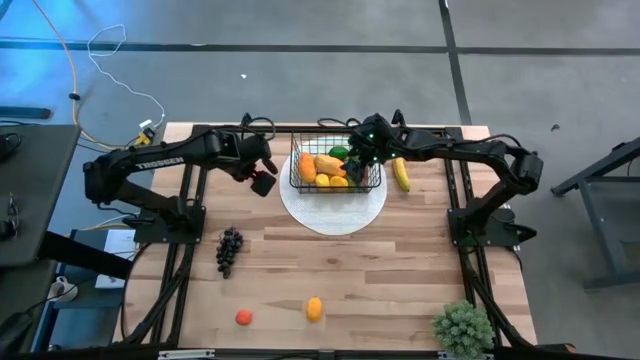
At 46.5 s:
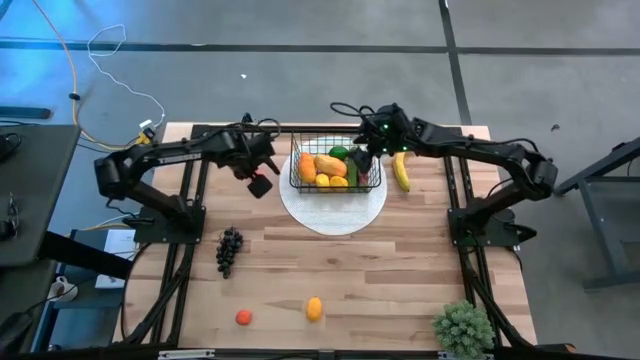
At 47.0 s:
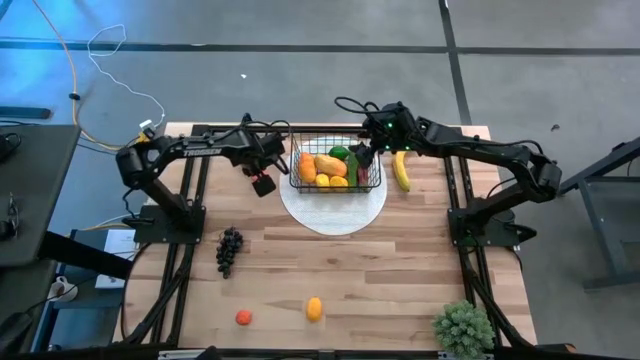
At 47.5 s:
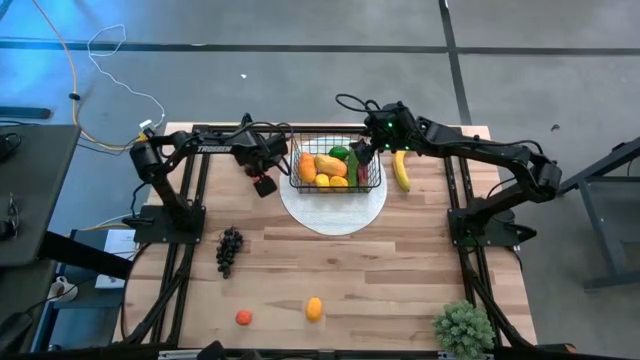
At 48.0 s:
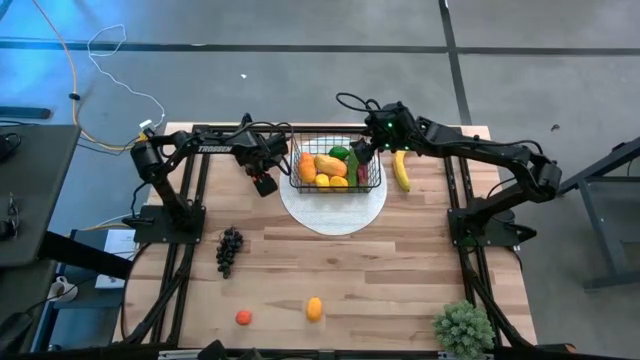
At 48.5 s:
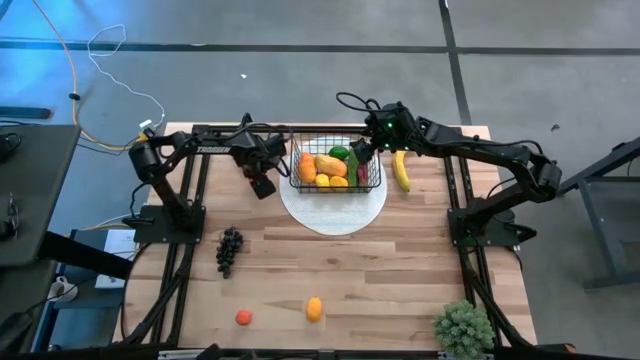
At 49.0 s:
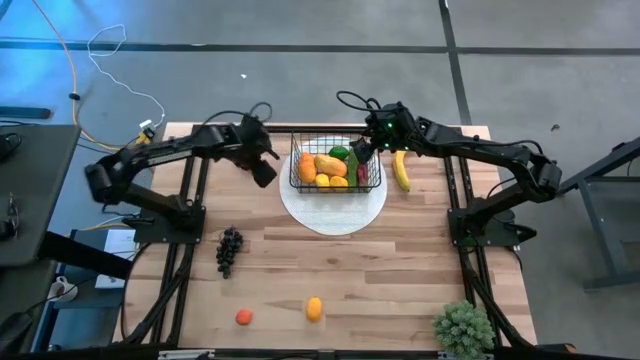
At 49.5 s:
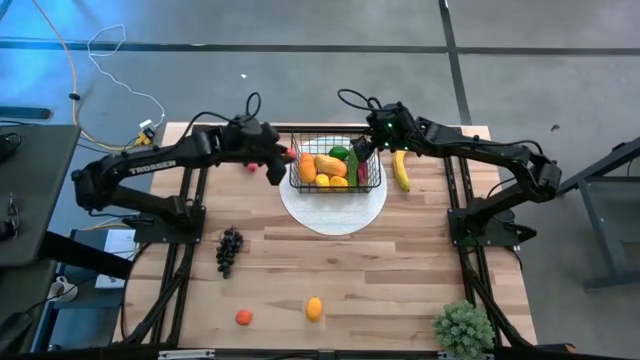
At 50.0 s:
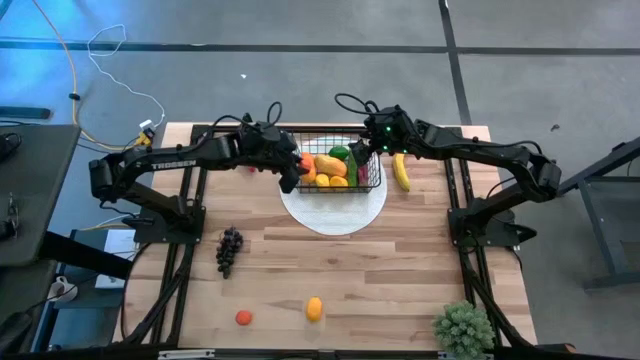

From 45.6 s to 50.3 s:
Task: Build produce basket
Put the top orange into the black wire basket

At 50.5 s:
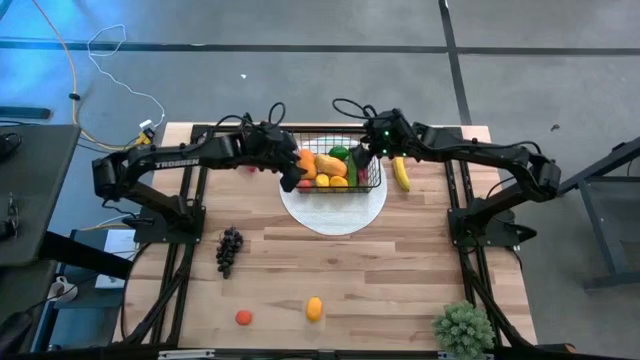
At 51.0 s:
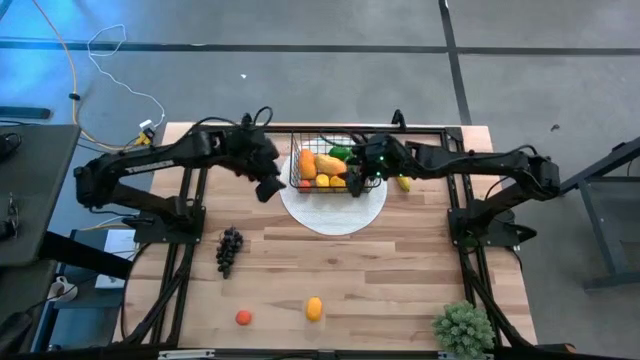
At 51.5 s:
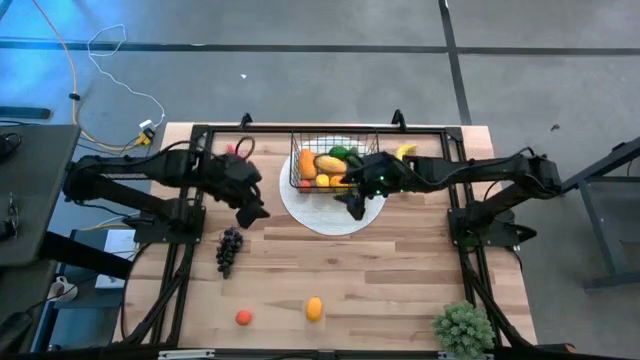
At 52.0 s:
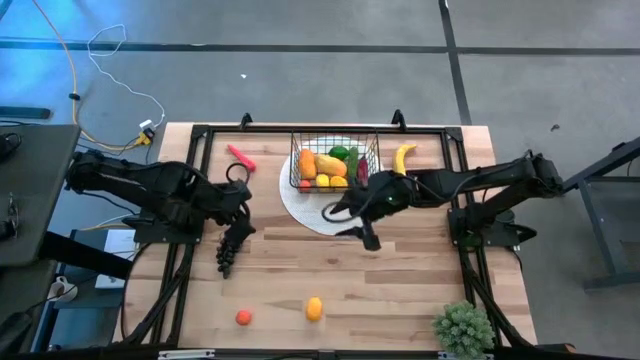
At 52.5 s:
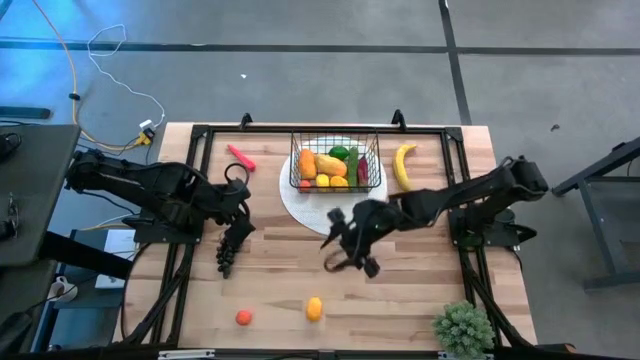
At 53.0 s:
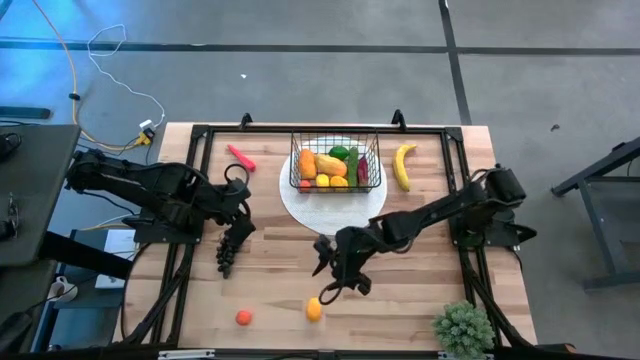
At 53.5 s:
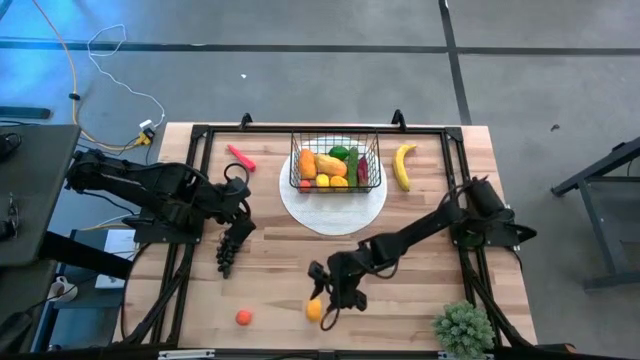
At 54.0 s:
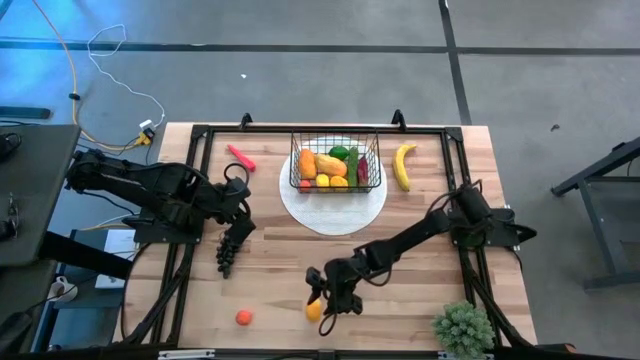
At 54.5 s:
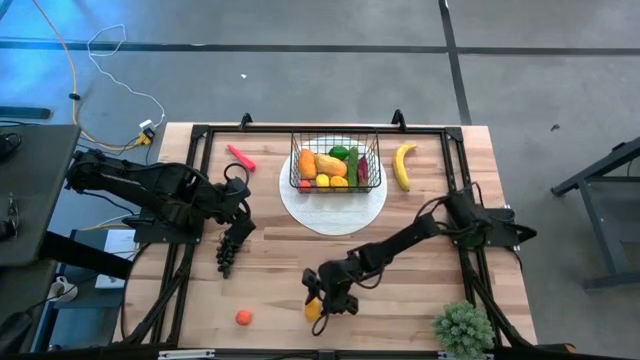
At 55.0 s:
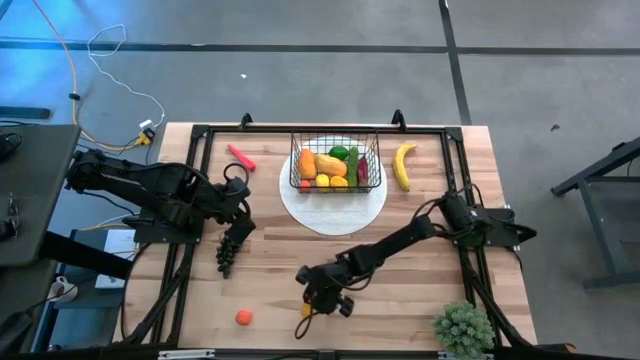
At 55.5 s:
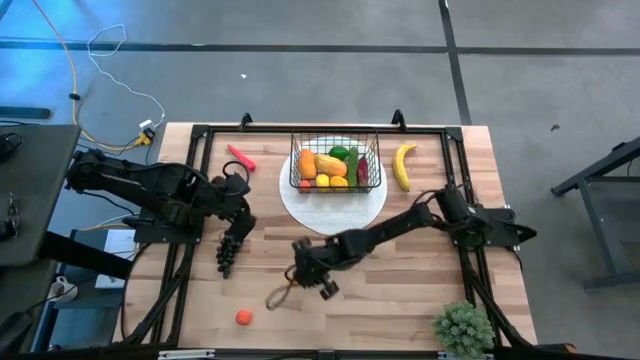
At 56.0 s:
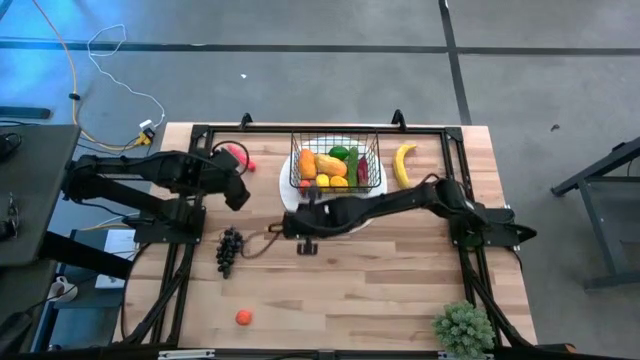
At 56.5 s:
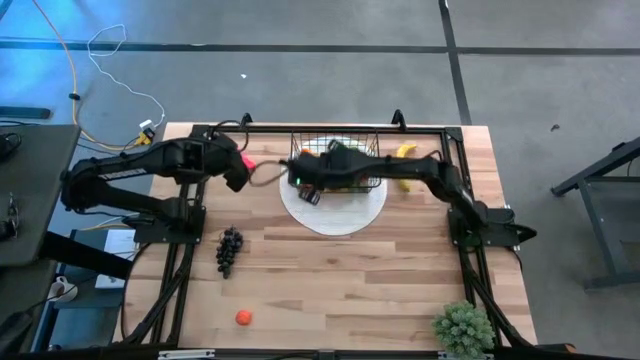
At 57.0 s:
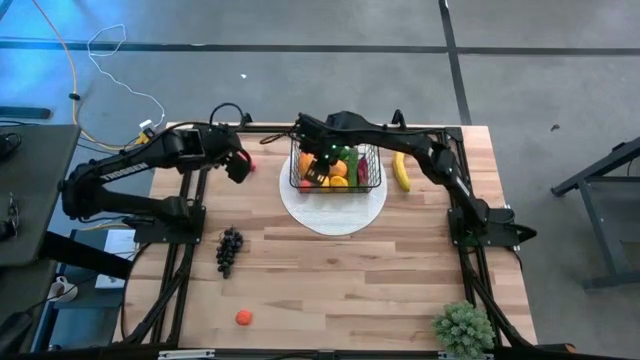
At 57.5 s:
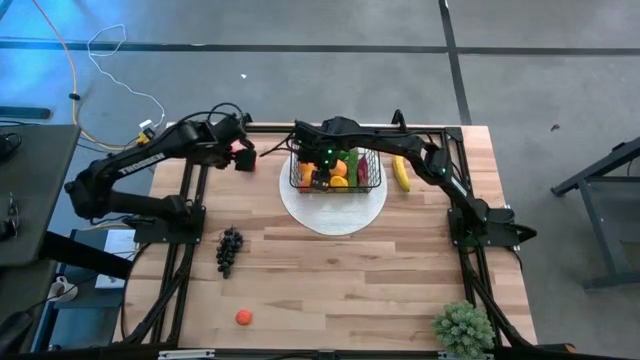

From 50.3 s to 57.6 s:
Put the yellow lemon into the black wire basket

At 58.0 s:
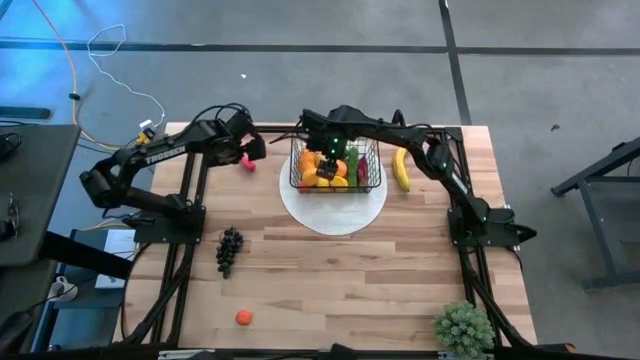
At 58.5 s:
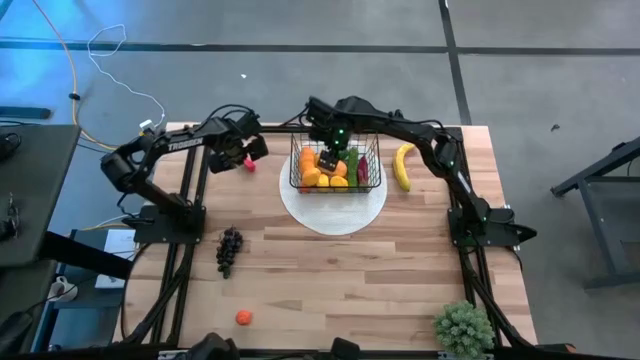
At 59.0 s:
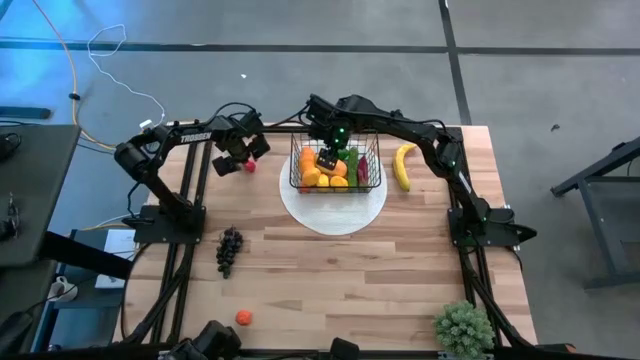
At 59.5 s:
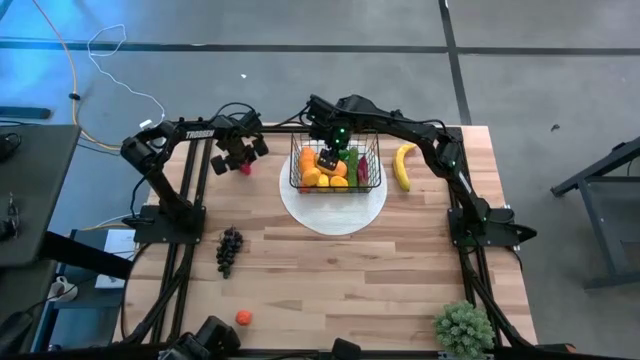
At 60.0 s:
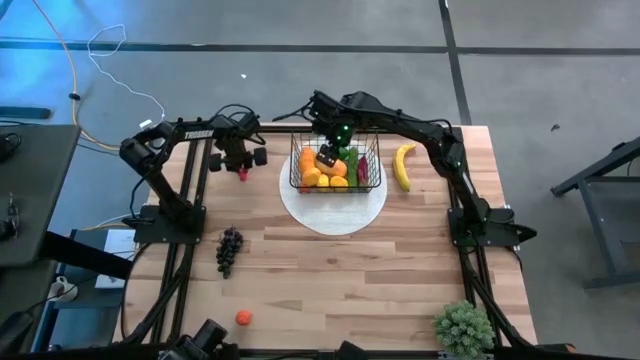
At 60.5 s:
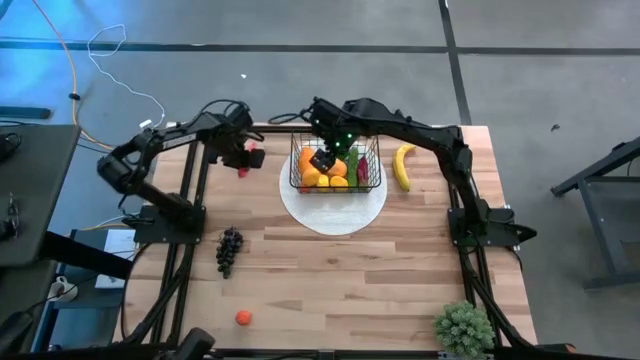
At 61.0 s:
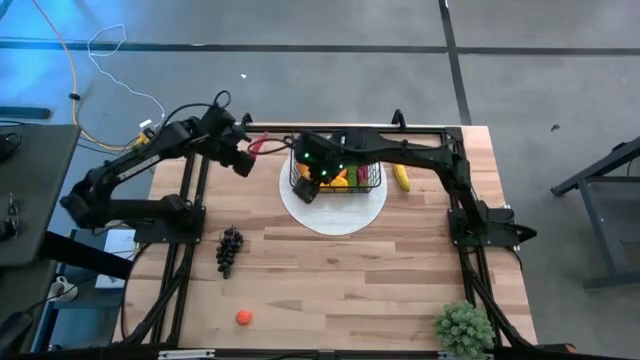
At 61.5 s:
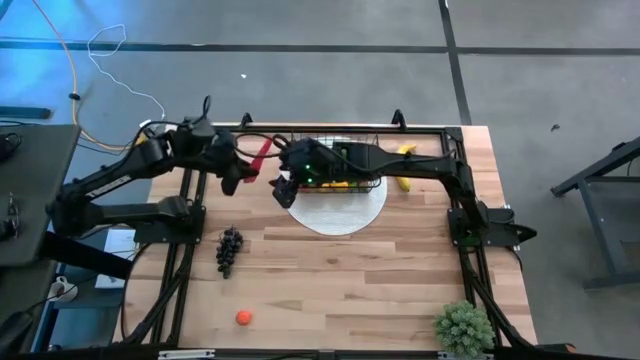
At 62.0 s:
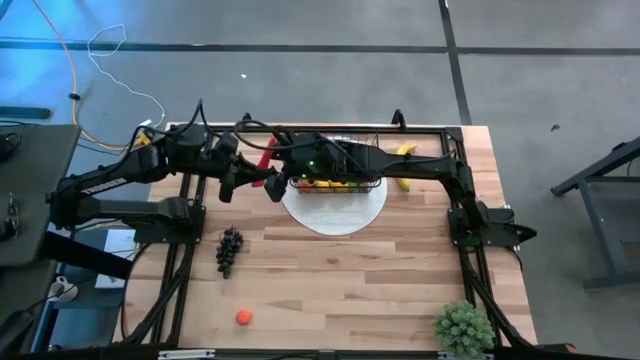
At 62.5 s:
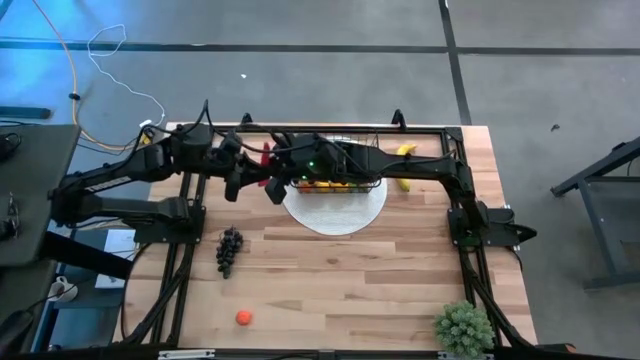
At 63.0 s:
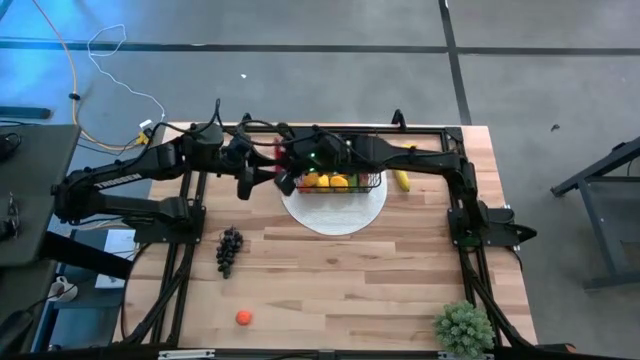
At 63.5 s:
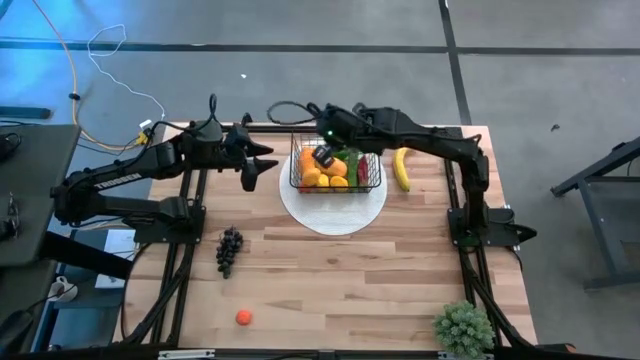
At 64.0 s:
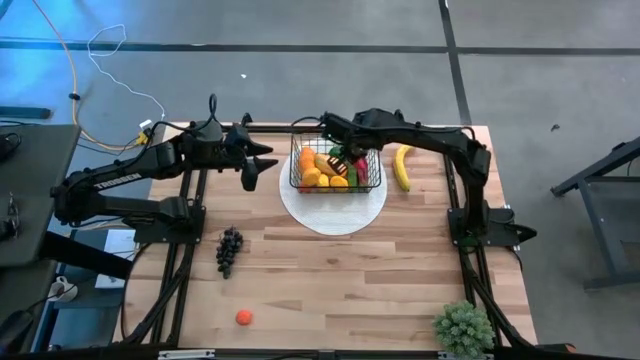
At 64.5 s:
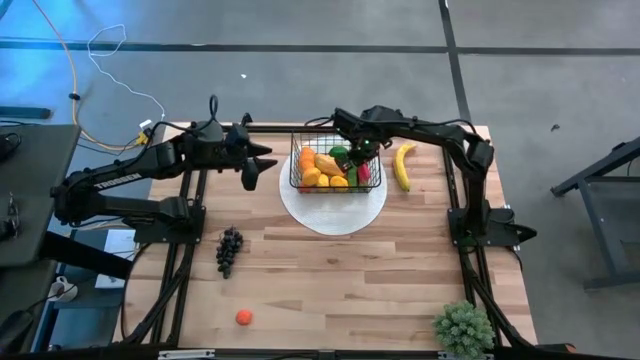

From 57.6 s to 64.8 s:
Put the orange carrot into the black wire basket
